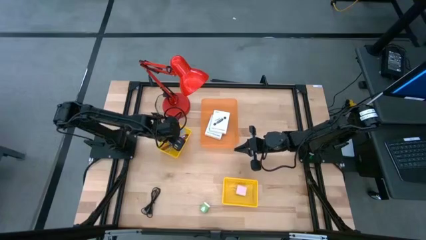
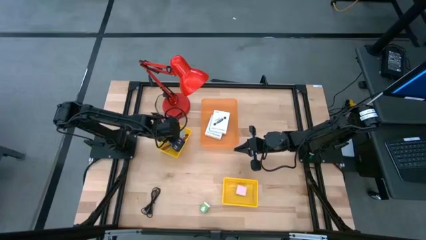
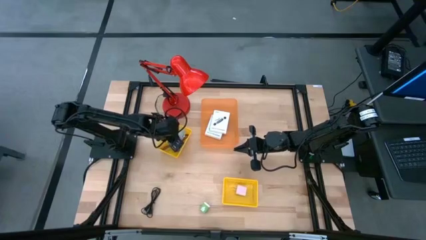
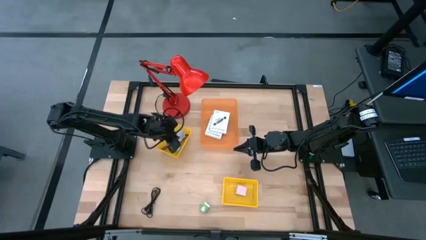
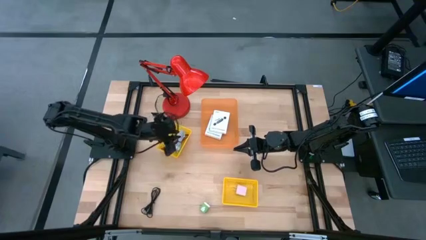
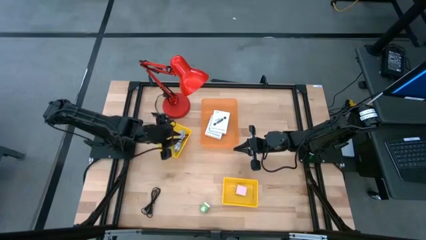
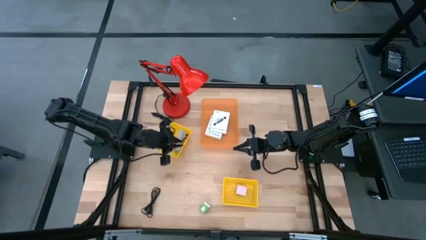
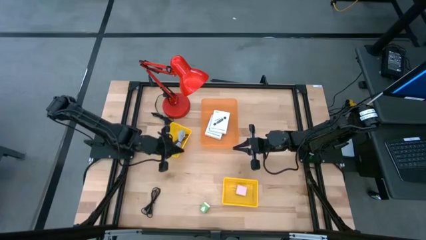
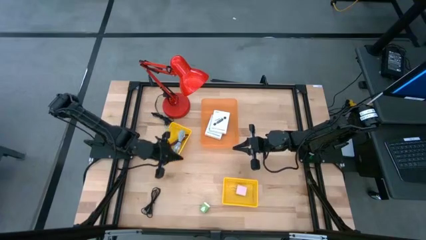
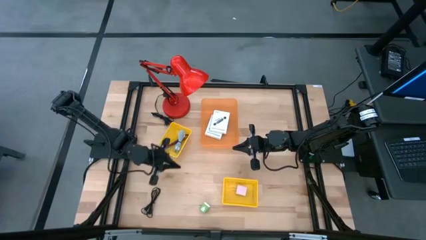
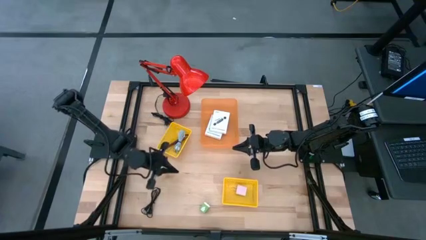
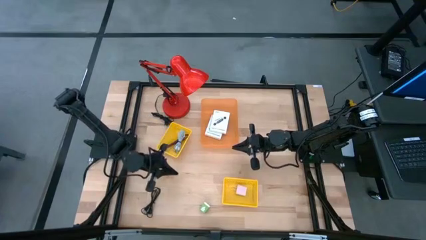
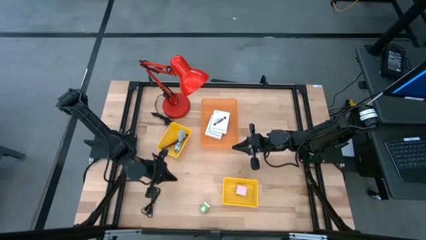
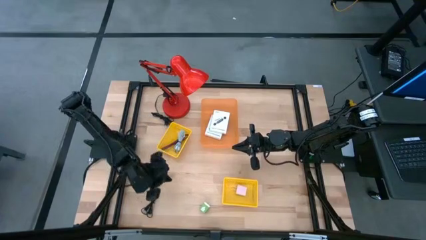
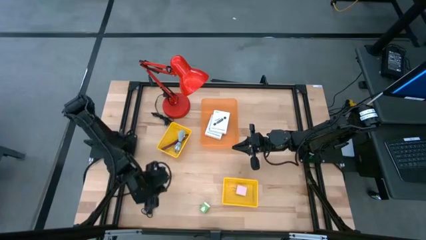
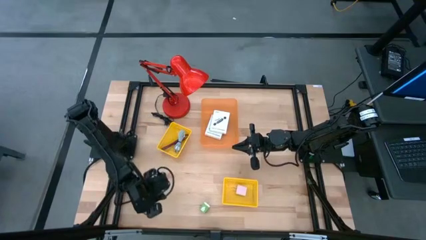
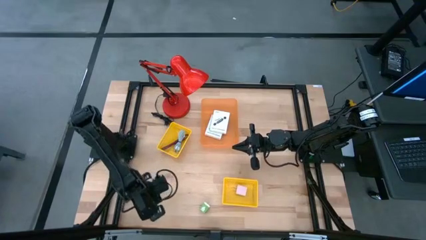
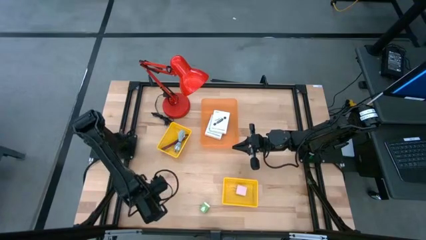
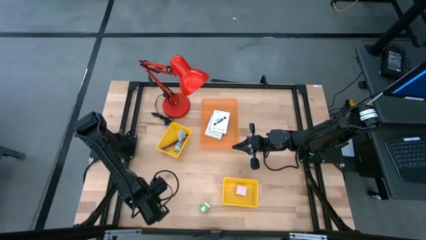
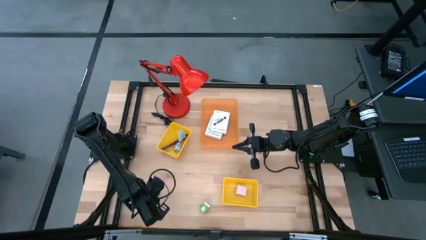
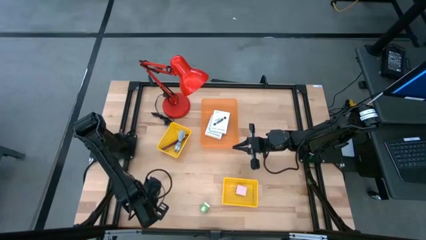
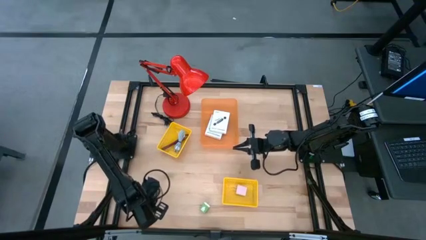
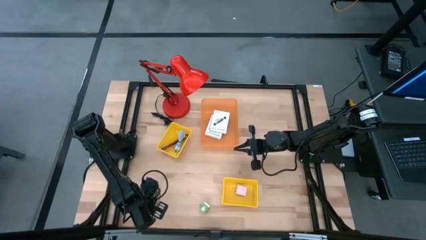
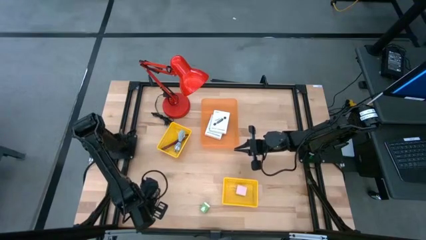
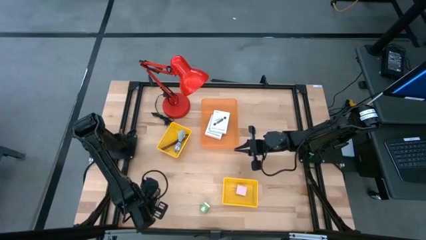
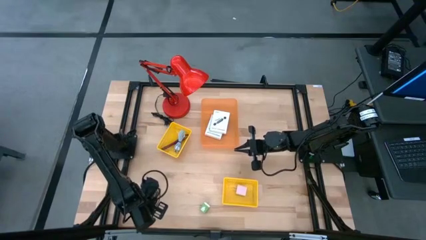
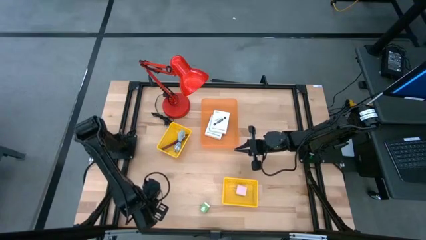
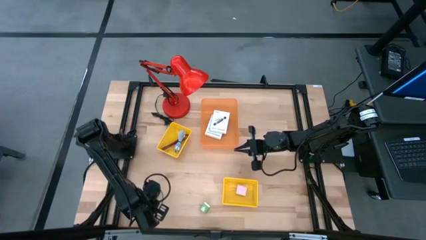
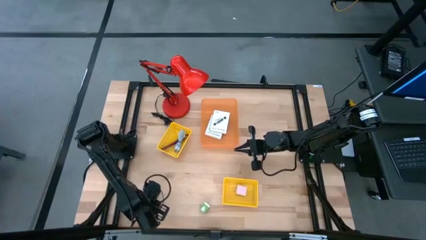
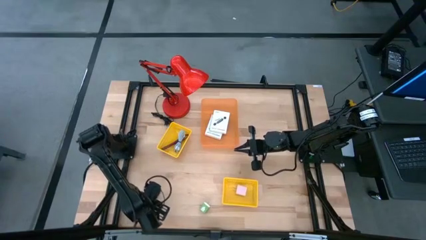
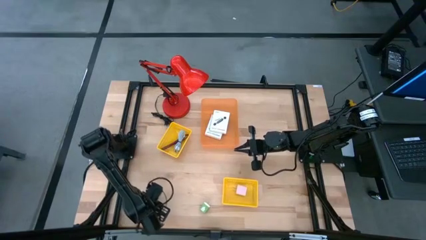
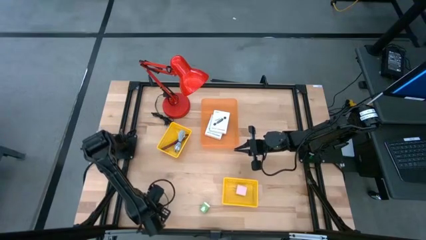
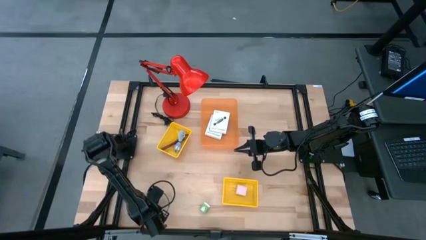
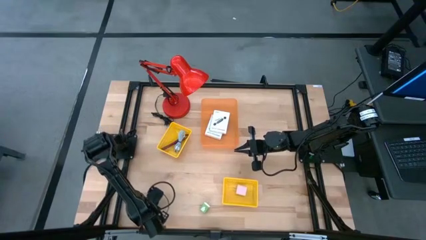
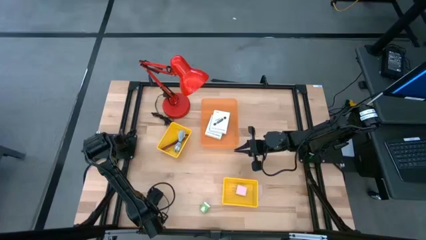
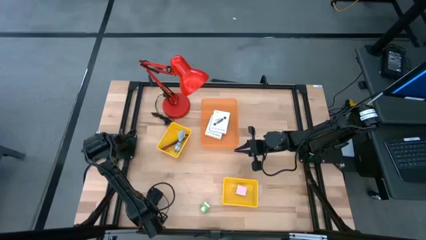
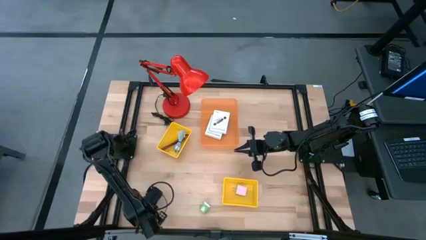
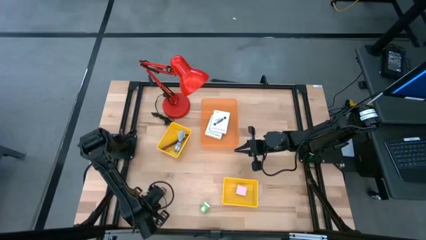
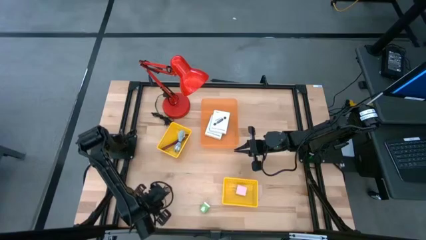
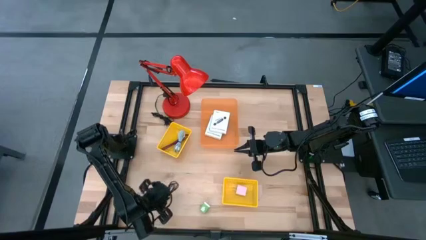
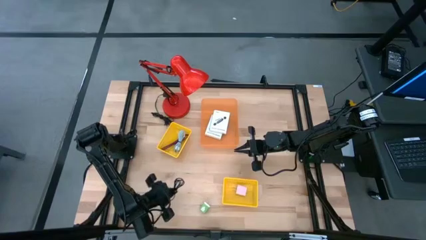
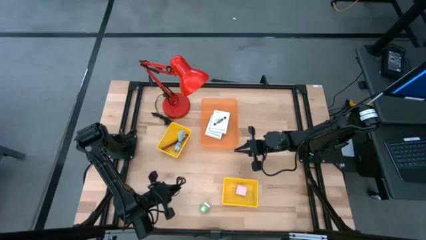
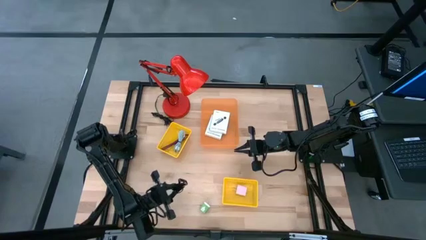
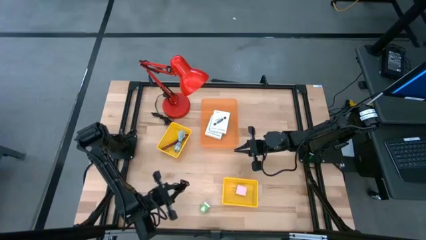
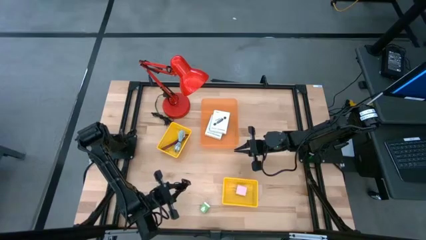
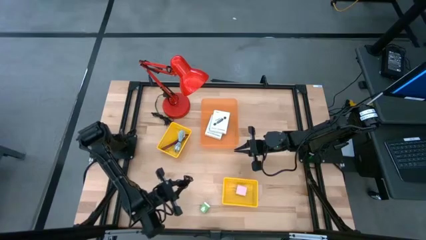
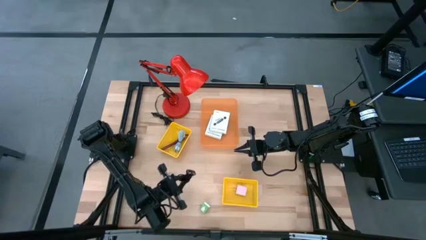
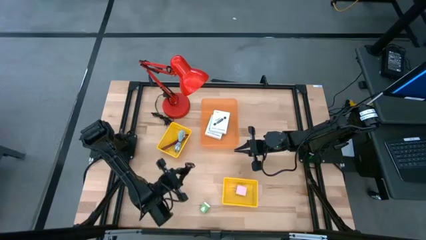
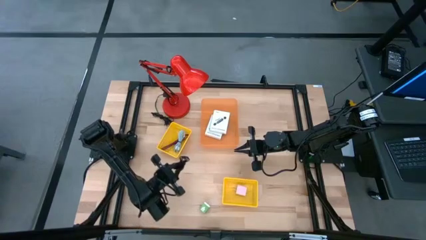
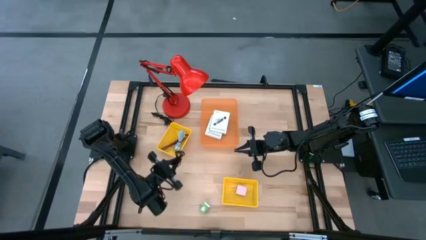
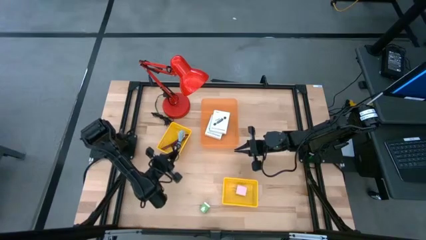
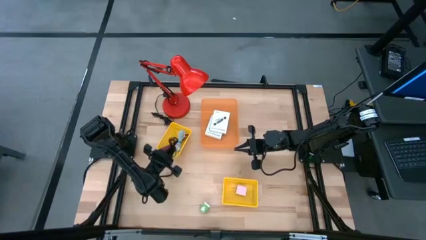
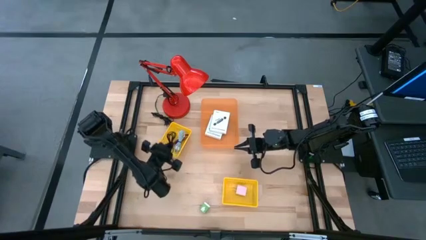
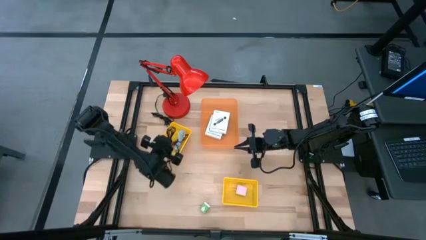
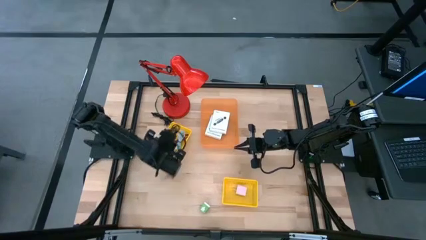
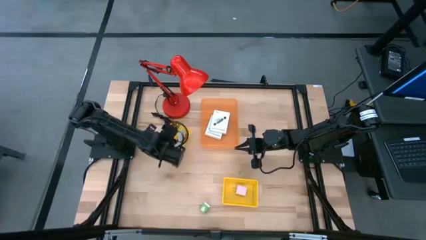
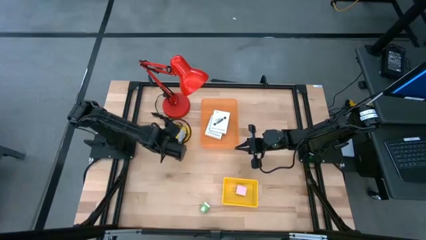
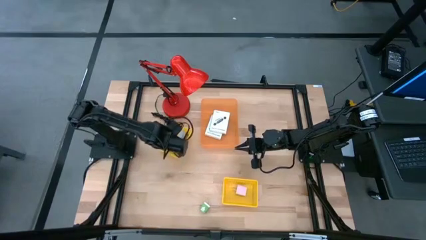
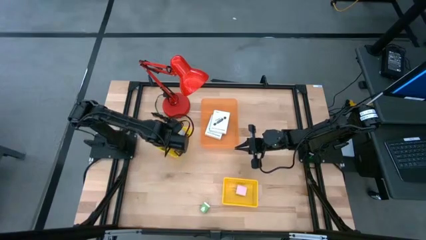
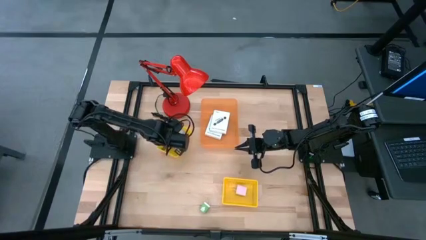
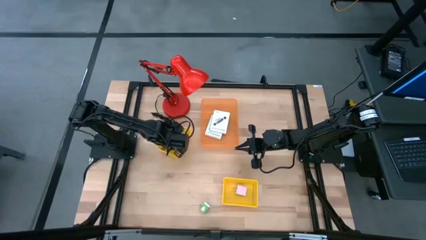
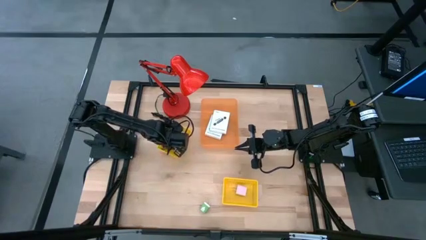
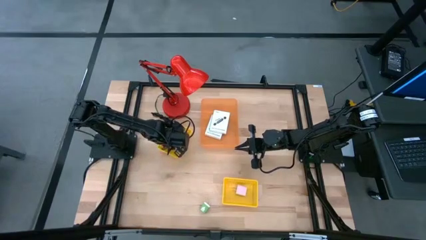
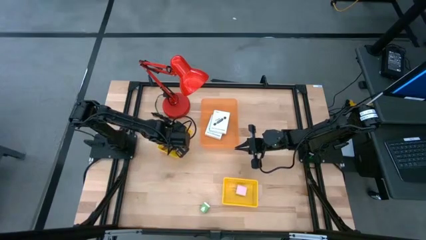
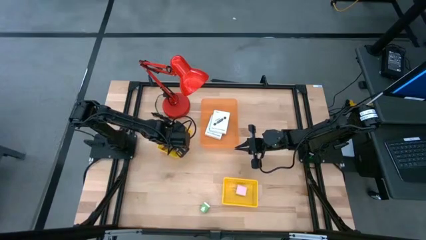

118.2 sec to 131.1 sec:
Task: Pick and place items into bin
Put the black charger cable into the left yellow bin
